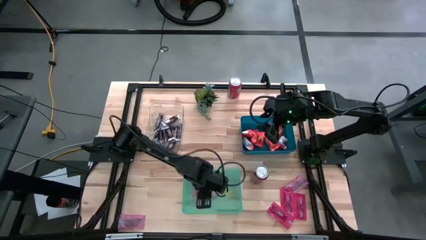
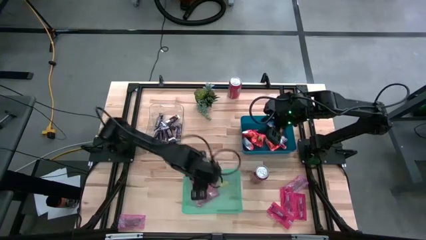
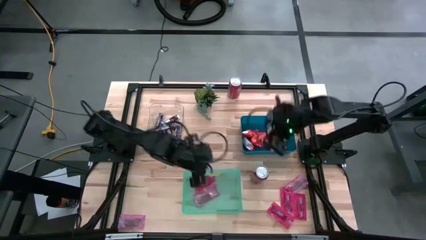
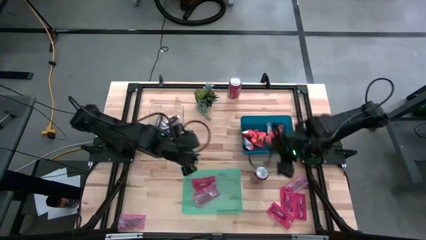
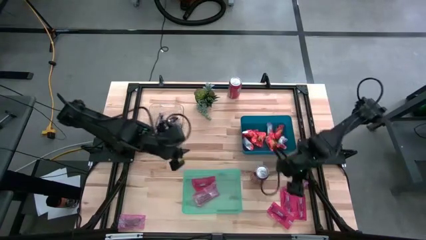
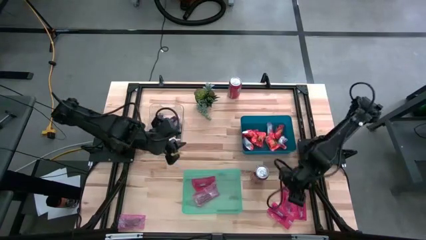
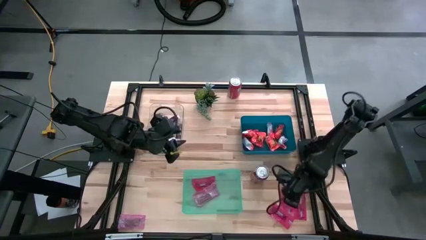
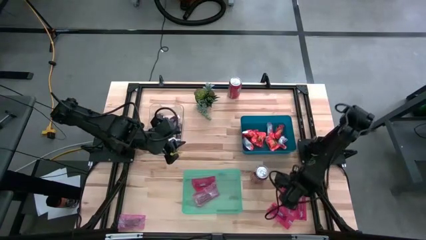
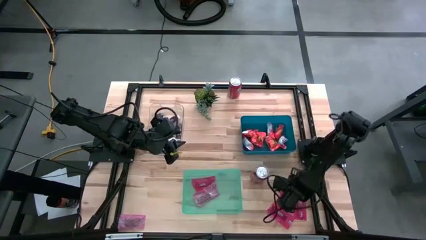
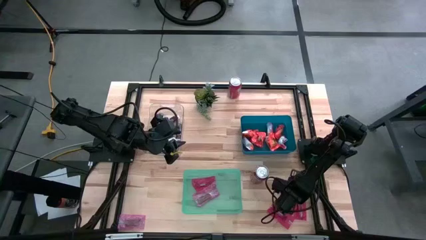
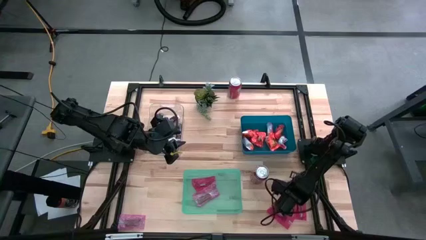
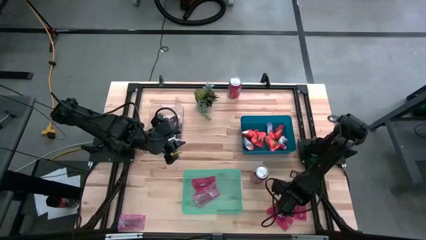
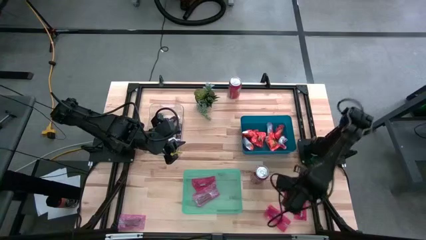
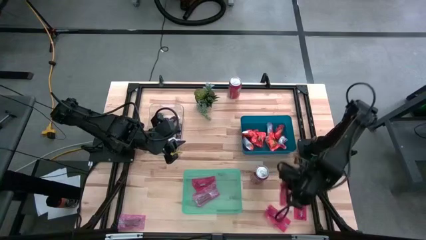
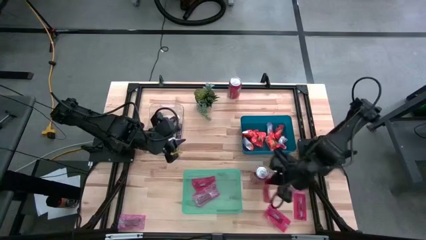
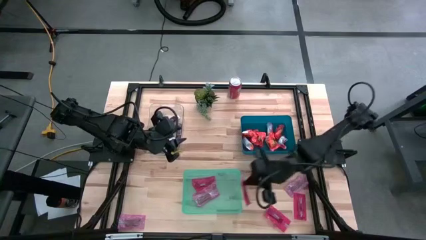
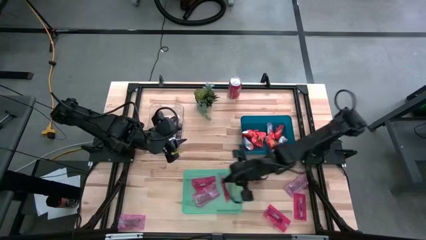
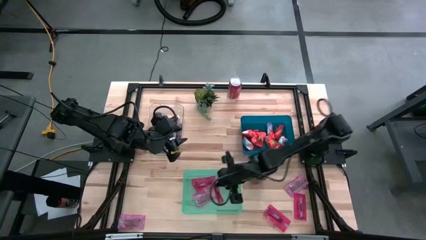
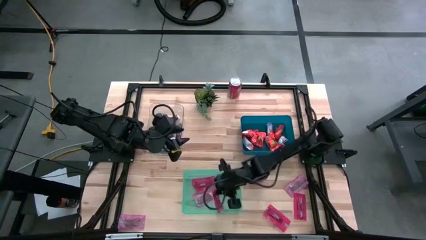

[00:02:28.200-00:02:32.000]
Task: Sort candy
Put the red candy into the green bin

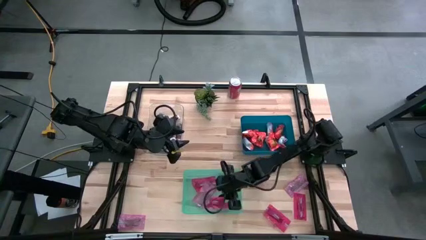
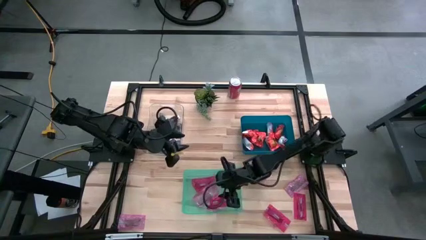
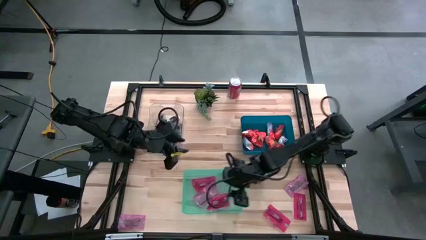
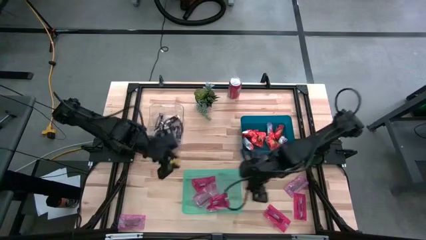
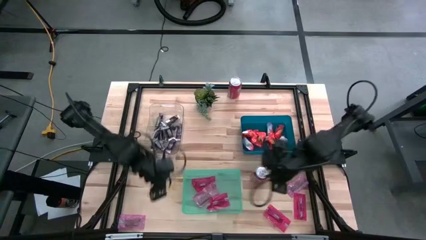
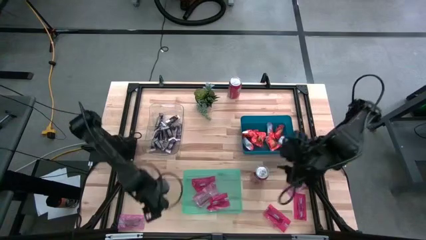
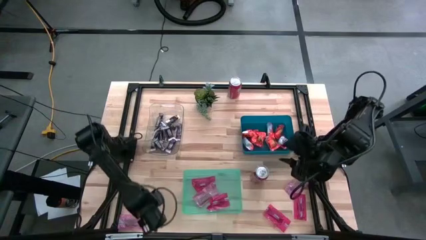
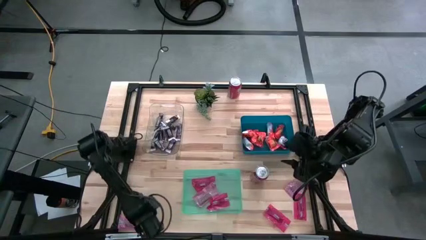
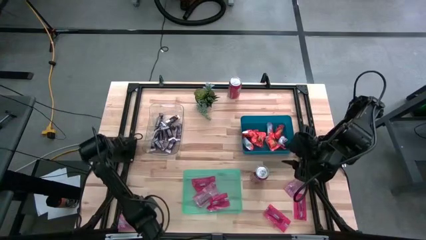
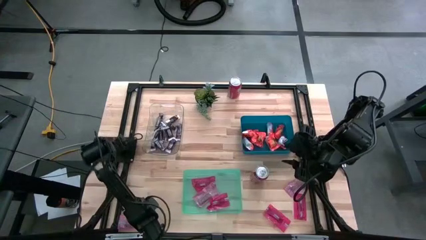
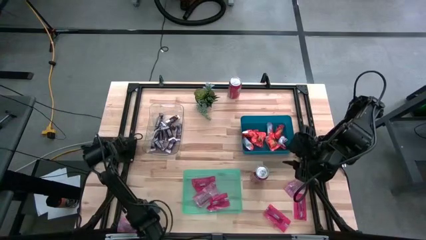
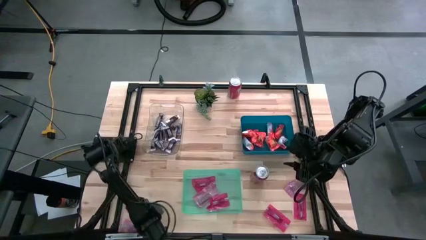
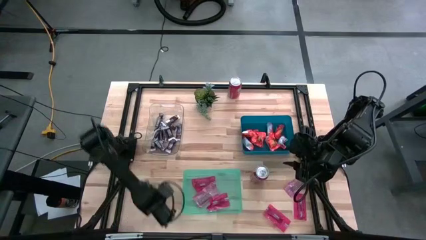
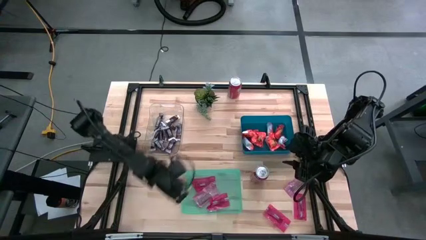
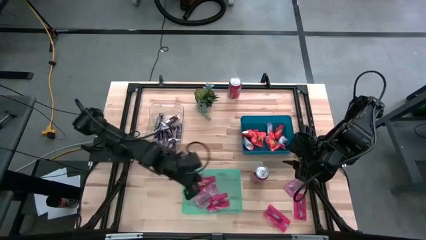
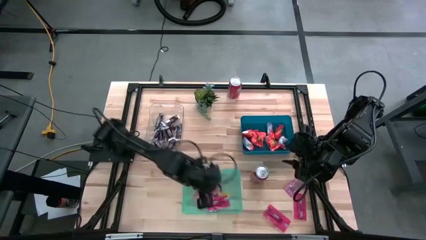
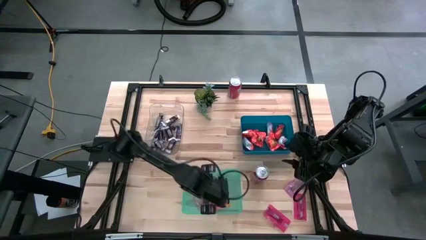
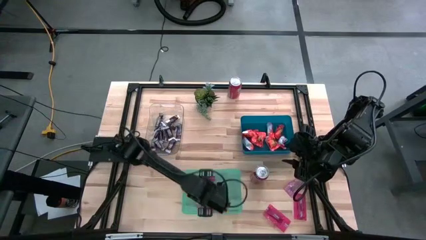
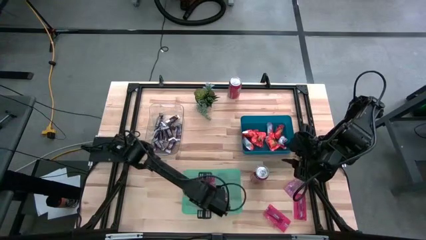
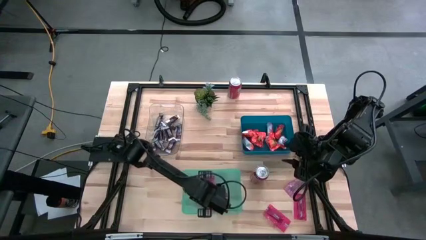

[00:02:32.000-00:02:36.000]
Put the red candy into the green bin

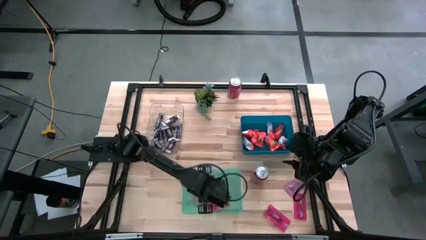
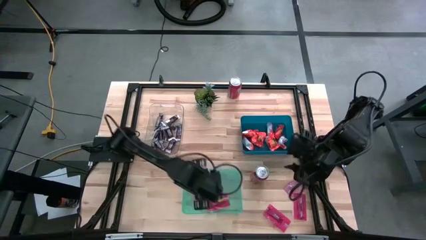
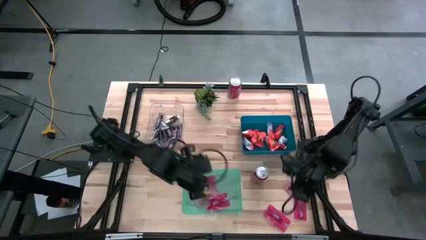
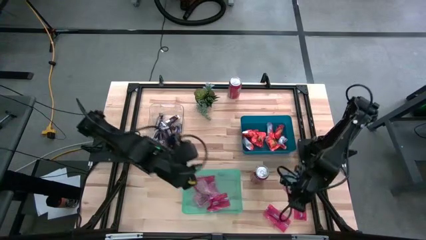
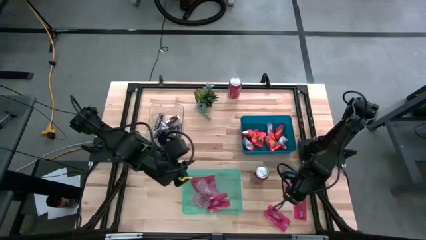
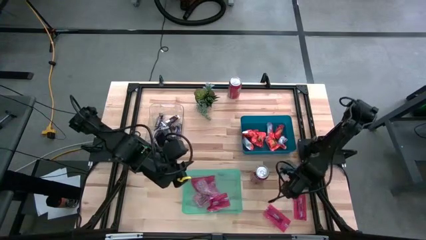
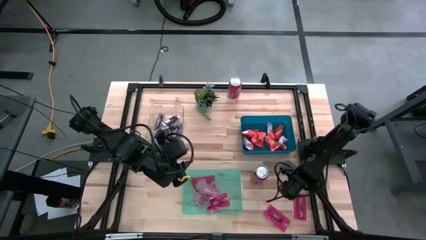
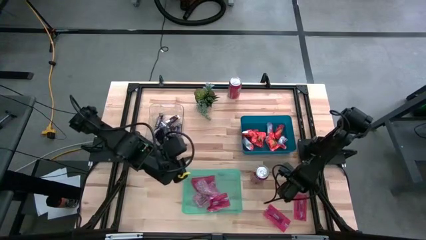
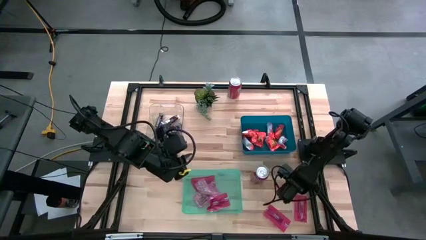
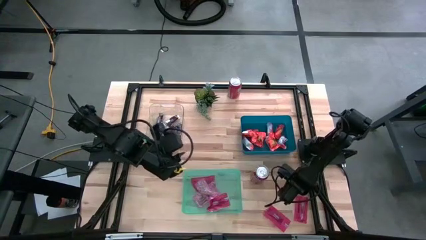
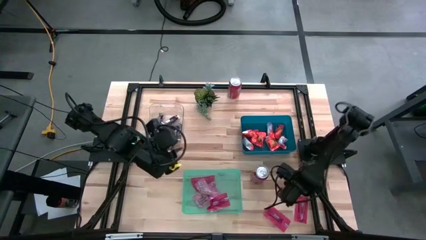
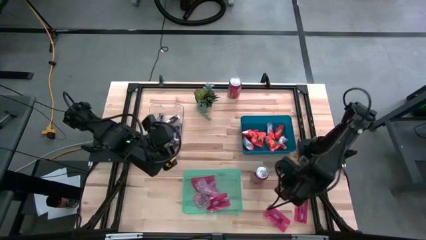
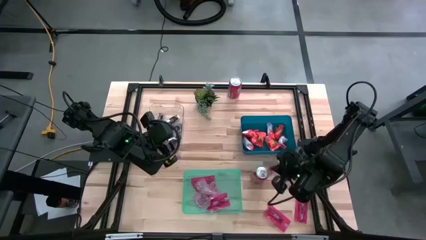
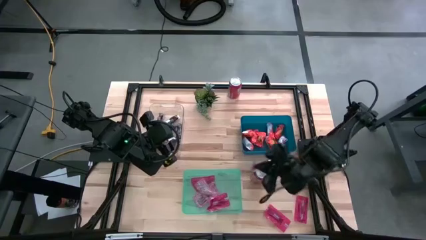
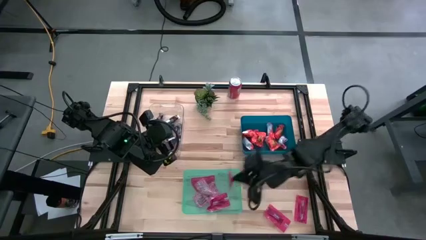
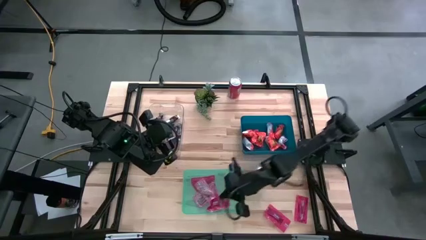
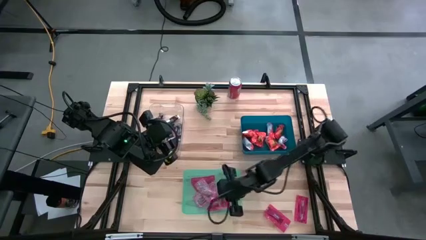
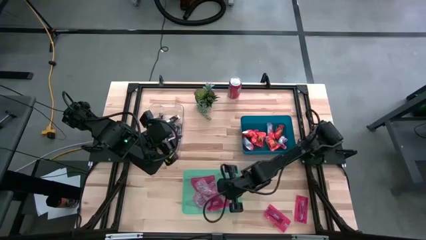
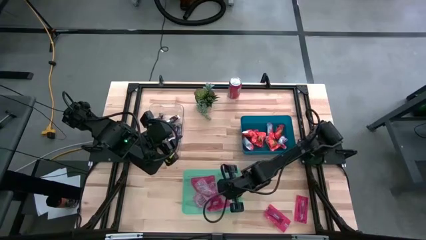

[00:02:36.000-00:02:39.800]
Put the red candy into the green bin

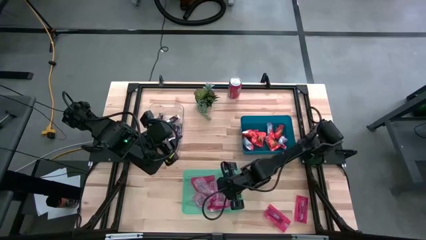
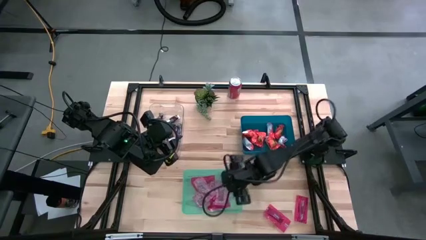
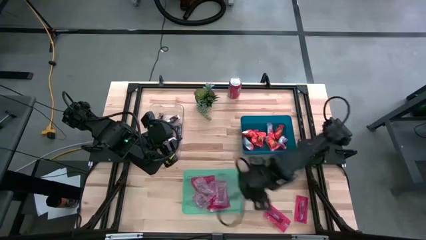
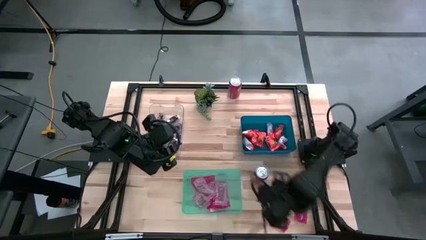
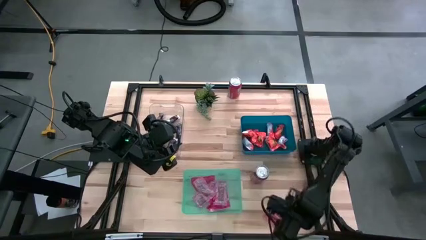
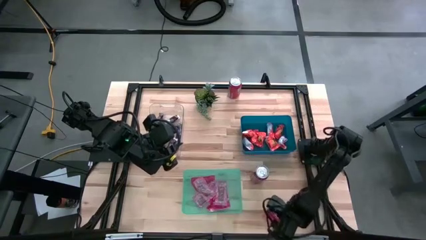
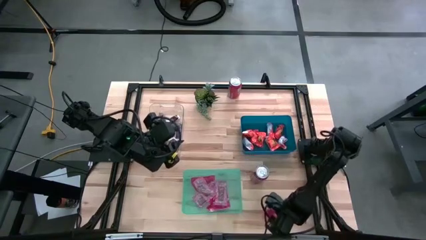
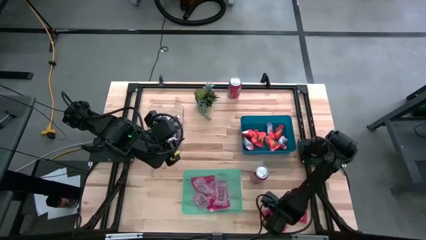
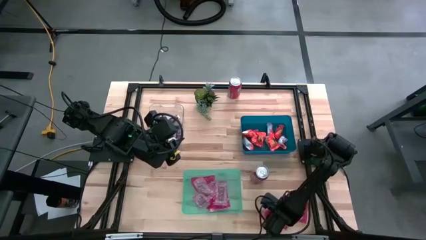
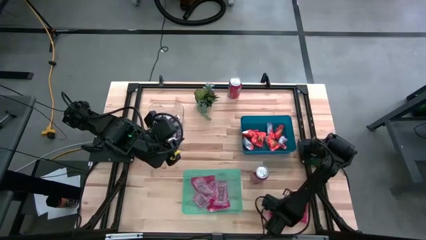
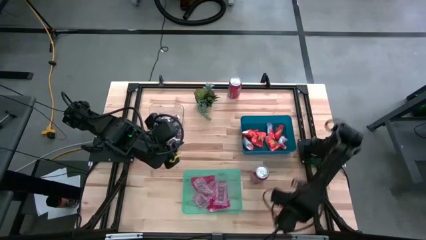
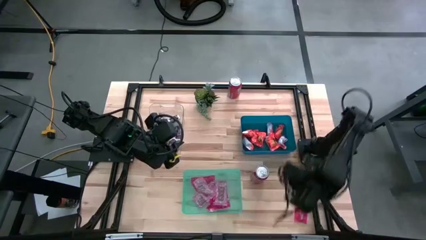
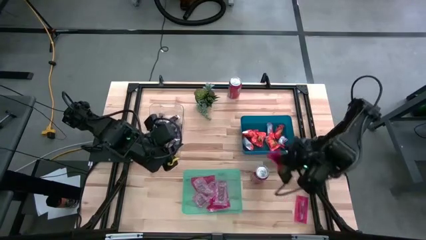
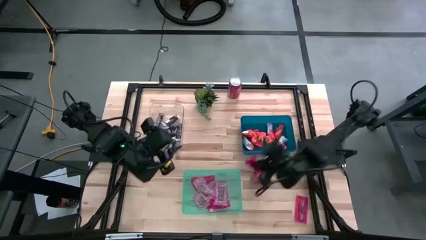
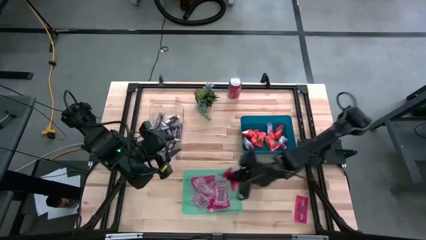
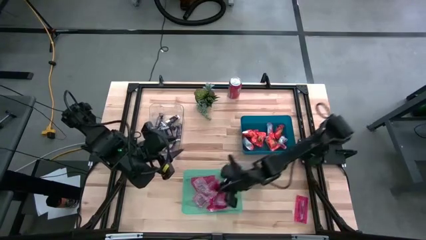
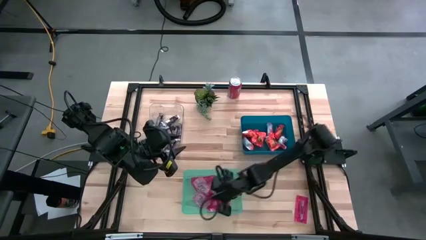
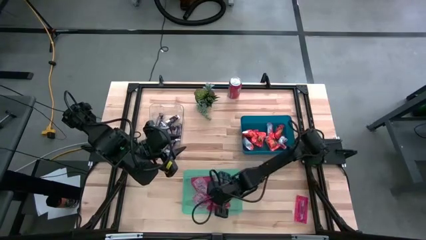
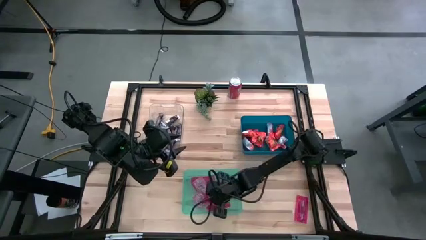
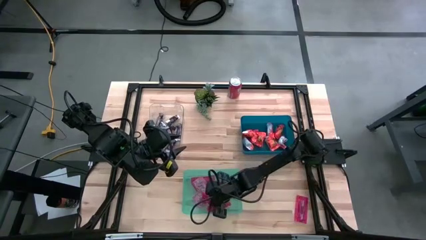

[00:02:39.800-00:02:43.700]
Put the red candy into the green bin
